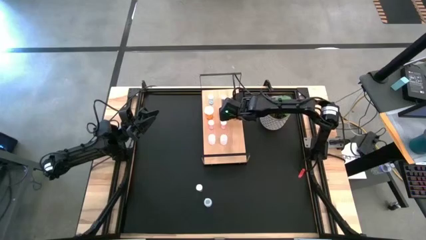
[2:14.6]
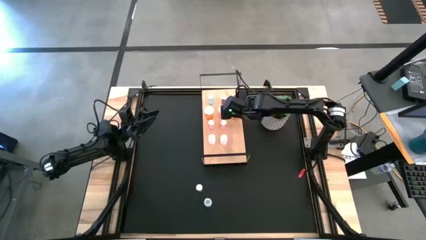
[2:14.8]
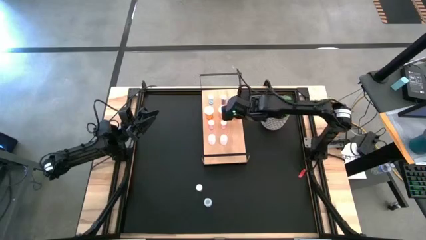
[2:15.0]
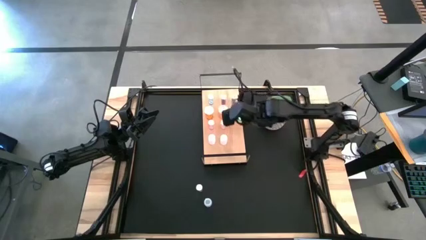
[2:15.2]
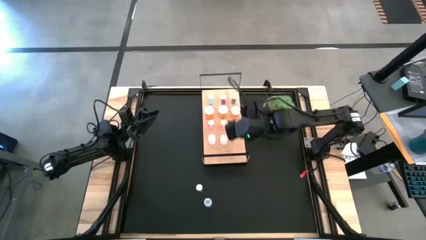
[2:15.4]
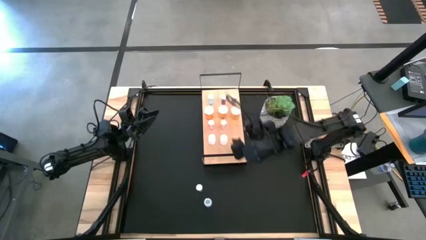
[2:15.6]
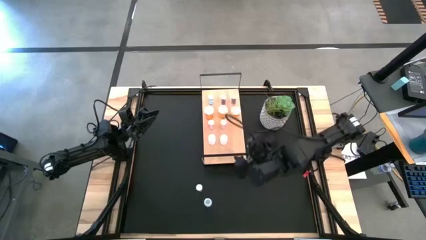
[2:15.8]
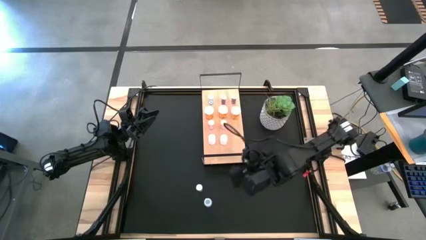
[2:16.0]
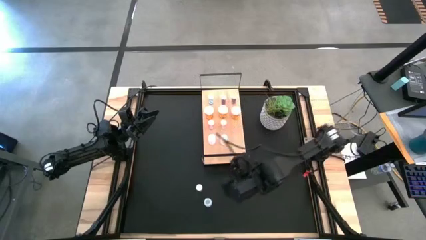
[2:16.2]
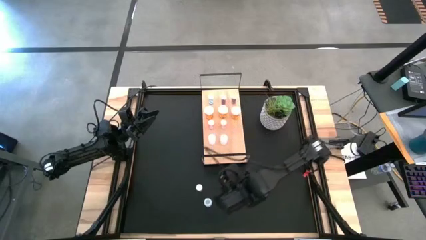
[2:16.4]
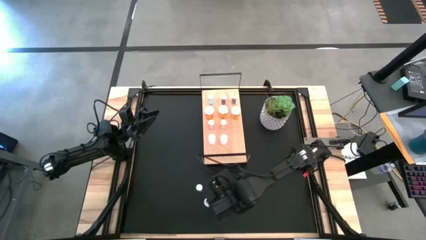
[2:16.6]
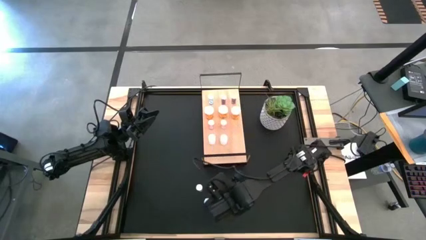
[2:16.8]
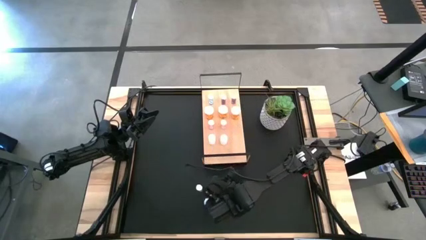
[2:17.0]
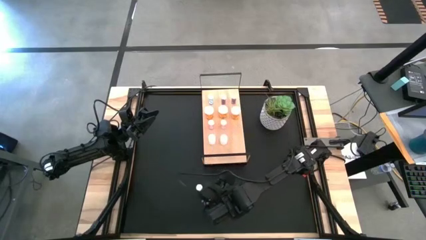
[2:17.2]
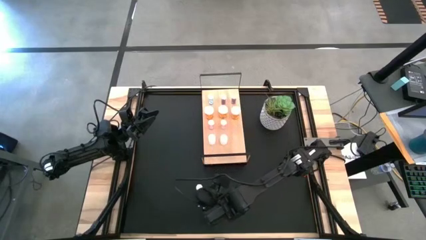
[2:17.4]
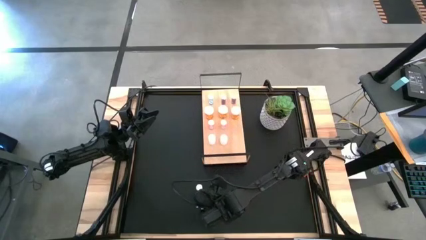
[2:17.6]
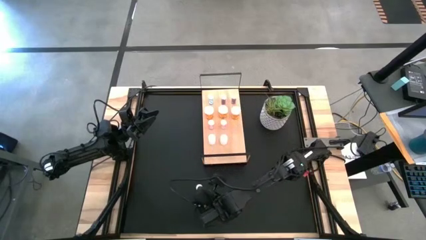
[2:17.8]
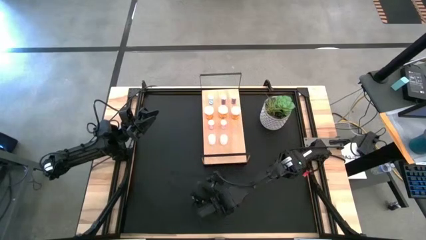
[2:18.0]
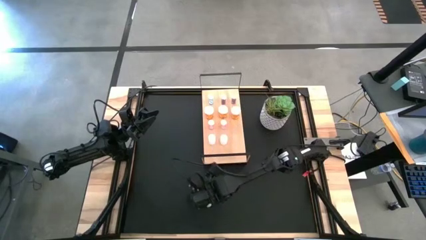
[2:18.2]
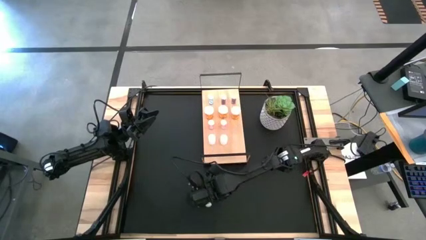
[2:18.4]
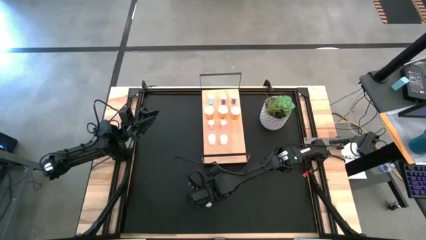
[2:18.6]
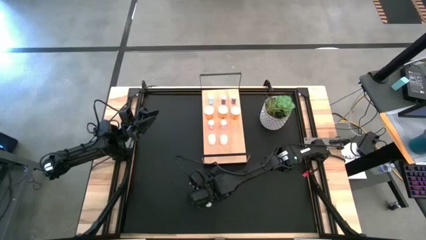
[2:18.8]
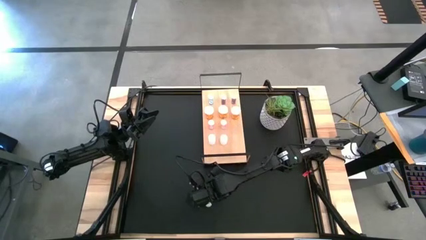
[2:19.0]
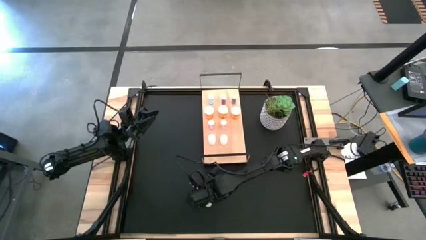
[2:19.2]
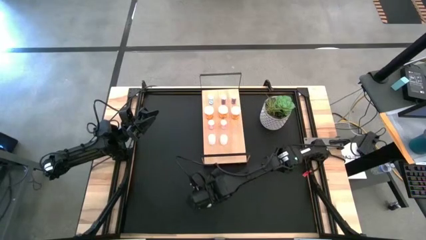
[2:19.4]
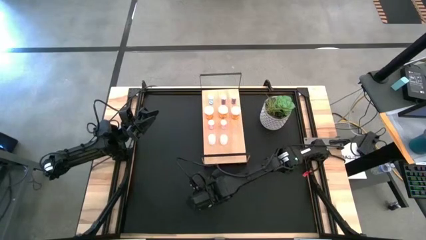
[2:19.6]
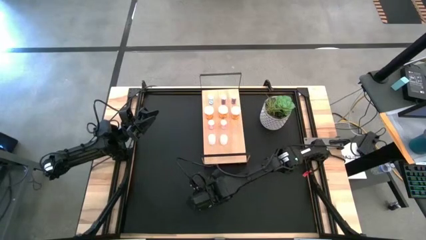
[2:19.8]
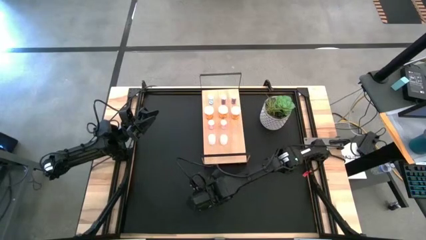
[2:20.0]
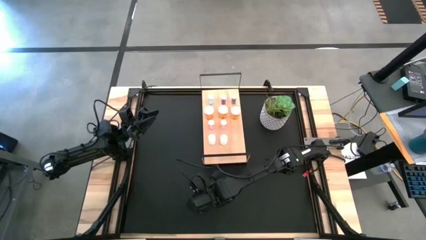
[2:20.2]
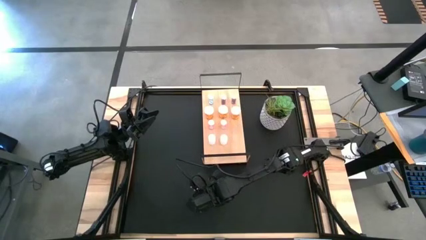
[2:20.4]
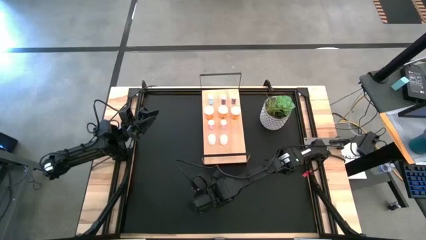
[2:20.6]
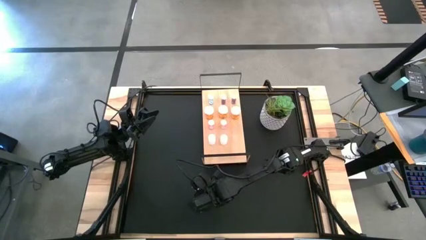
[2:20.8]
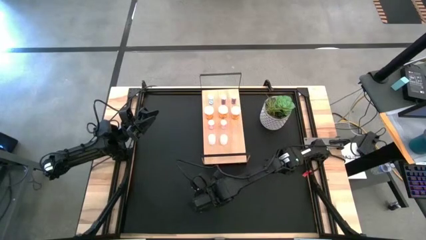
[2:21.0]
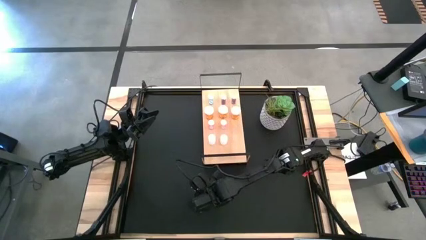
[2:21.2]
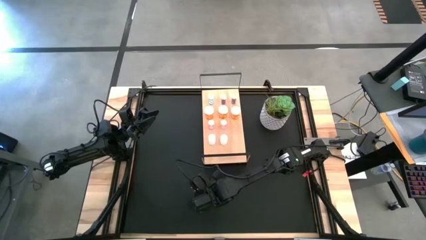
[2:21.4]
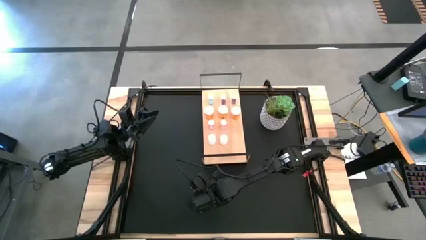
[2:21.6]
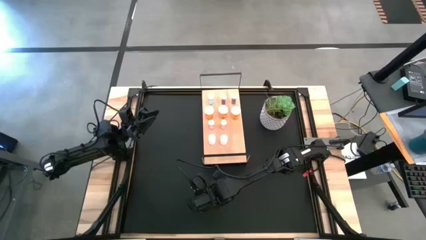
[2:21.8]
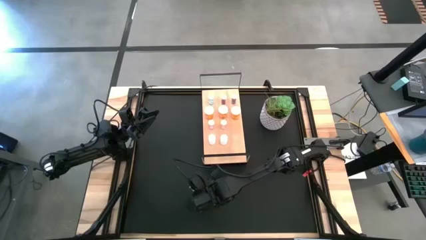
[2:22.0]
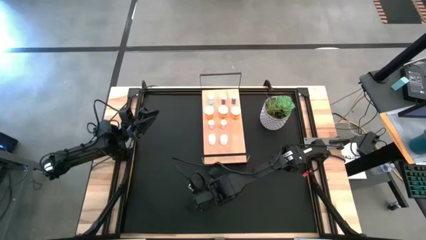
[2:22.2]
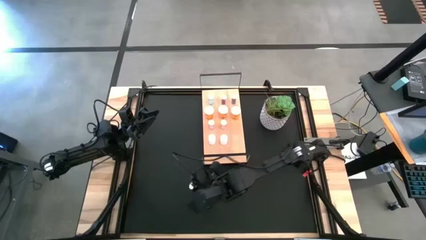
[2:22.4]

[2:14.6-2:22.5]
Task: Pick and place medicine bottles onto shelf by color
Put the pink pill bottle on the shelf aligned with the pink pill bottle

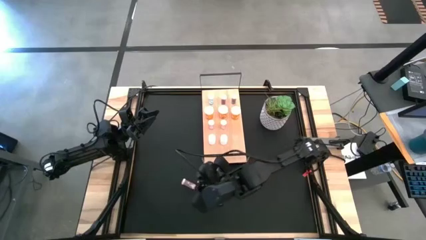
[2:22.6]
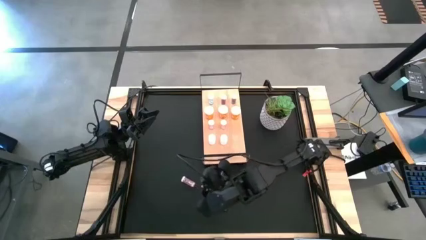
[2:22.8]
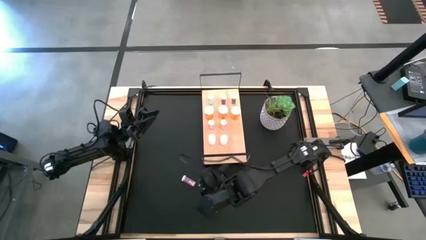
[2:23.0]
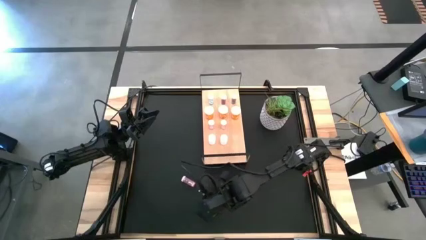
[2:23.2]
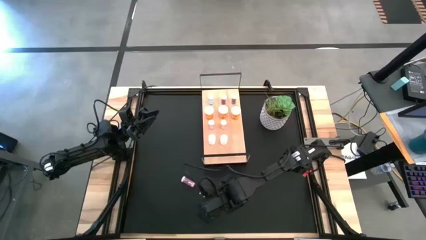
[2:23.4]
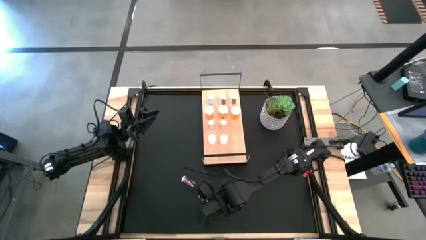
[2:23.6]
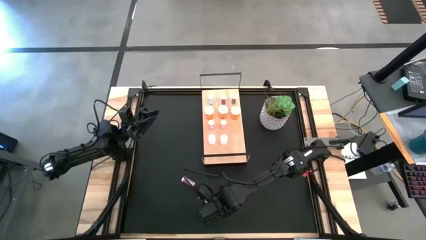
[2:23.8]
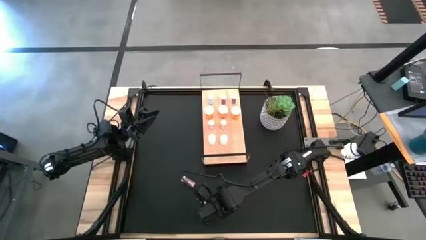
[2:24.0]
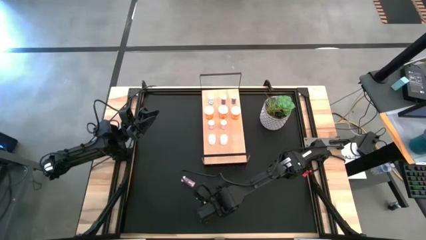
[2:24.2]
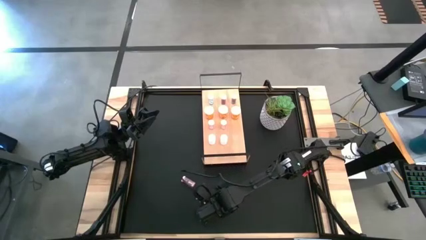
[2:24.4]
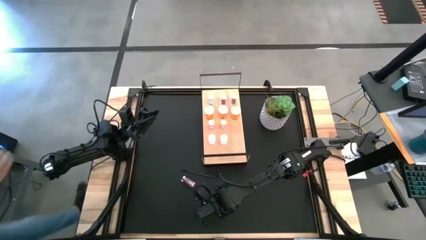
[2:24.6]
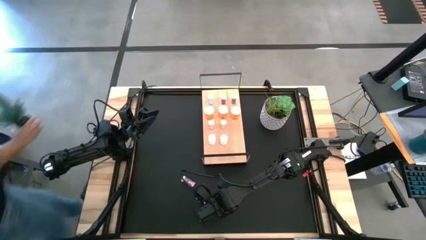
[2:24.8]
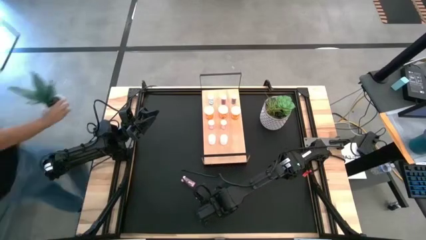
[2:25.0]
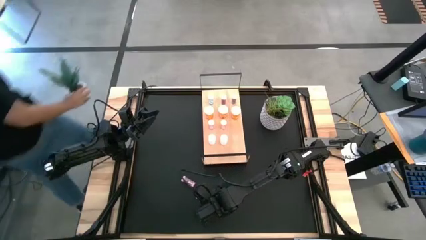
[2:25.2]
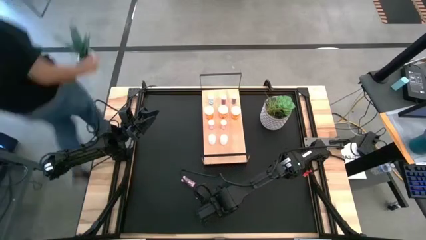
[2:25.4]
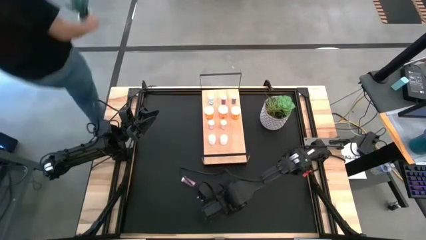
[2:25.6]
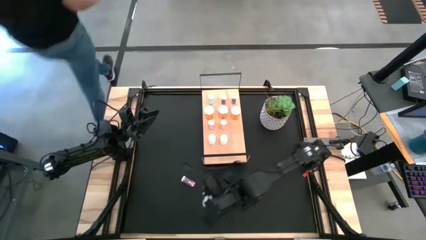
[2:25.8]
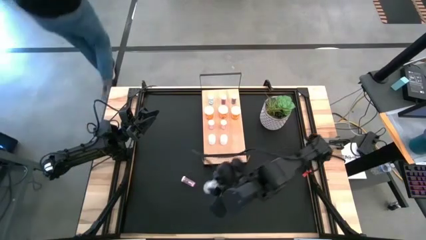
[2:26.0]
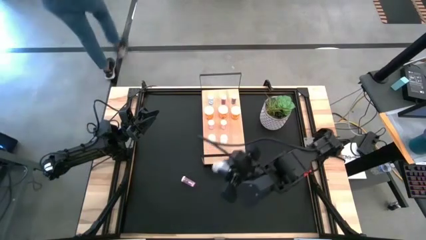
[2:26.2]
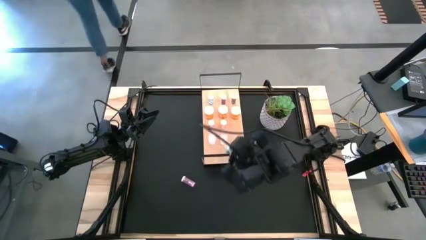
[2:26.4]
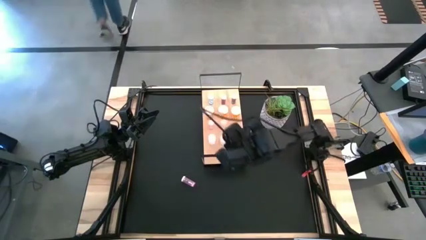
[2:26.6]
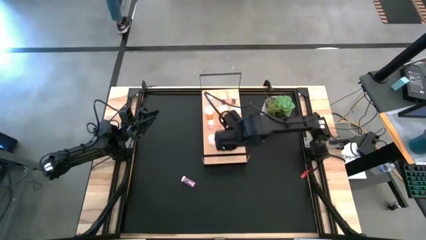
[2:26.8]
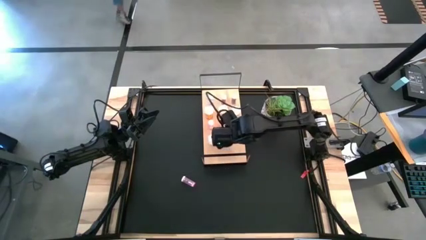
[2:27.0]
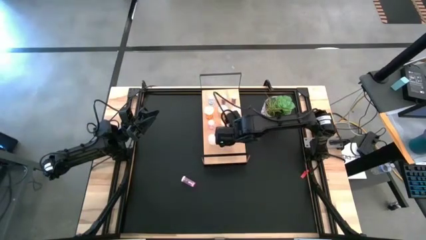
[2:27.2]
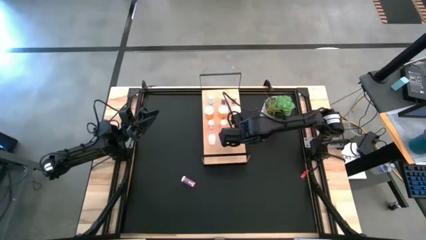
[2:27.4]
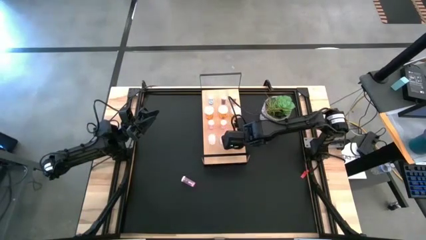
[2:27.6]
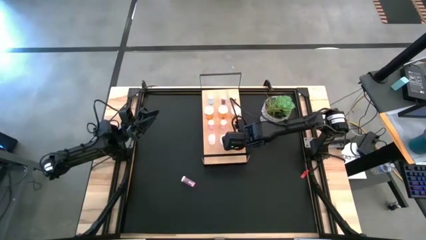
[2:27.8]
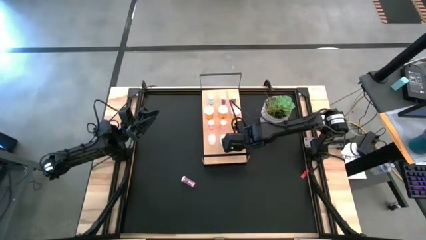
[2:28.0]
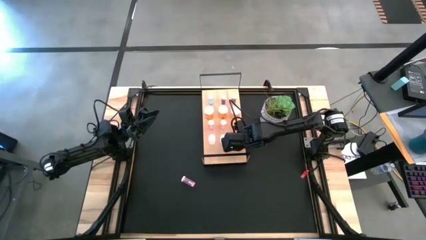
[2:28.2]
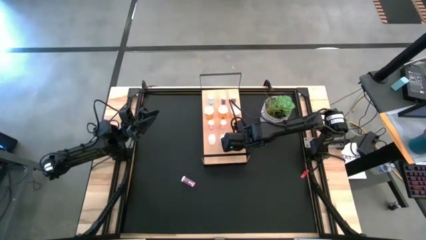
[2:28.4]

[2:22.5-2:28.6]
Put the white pill bottle on the shelf aligned with the white pill bottle

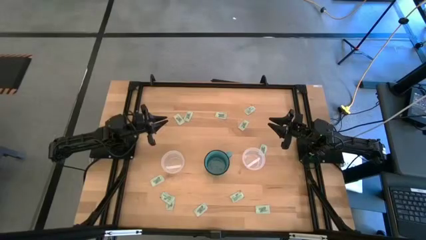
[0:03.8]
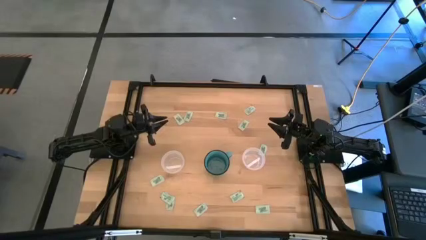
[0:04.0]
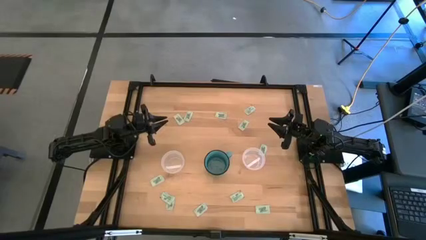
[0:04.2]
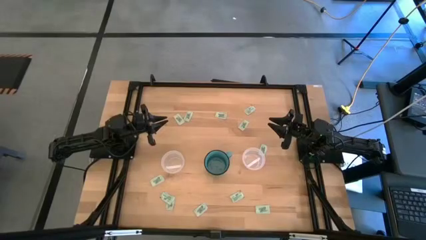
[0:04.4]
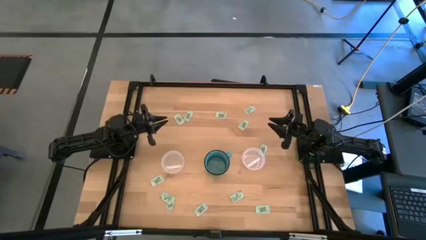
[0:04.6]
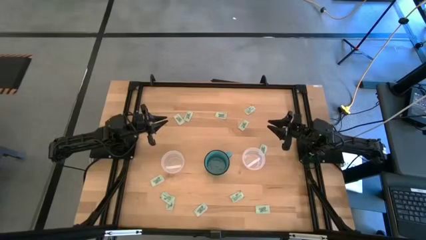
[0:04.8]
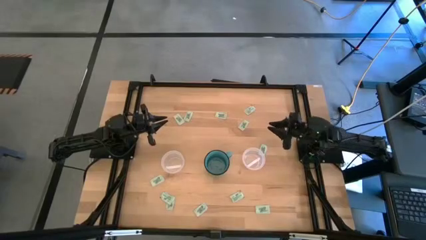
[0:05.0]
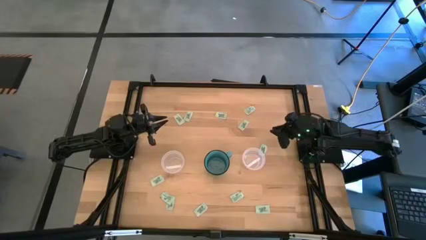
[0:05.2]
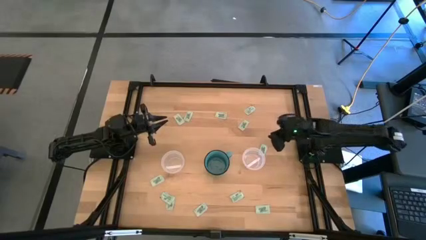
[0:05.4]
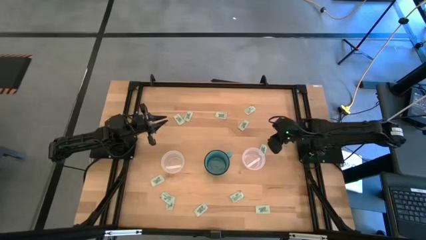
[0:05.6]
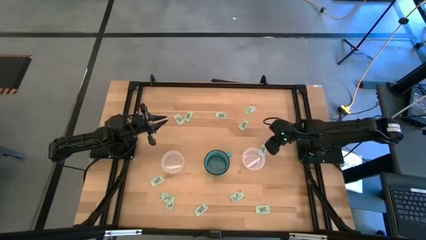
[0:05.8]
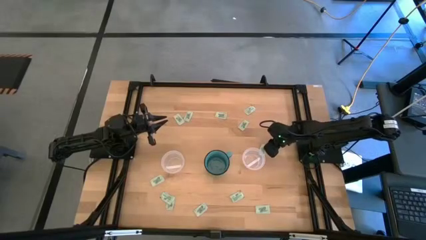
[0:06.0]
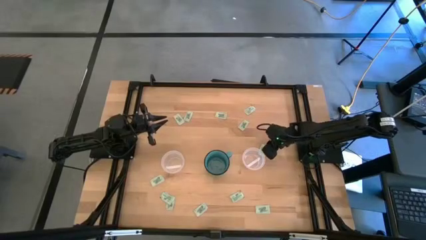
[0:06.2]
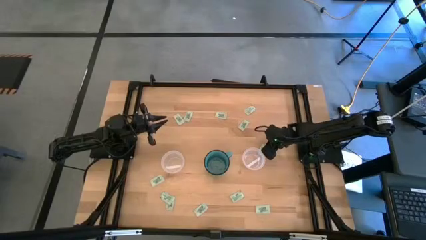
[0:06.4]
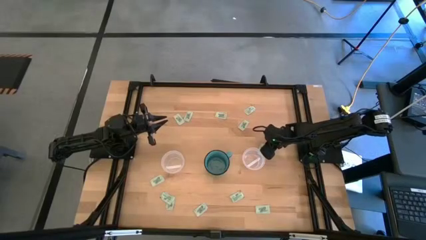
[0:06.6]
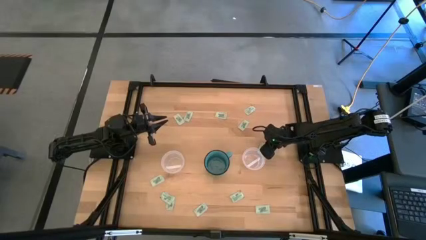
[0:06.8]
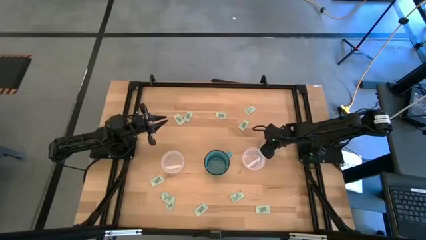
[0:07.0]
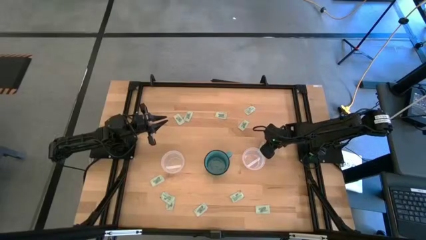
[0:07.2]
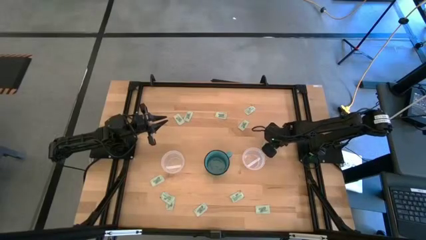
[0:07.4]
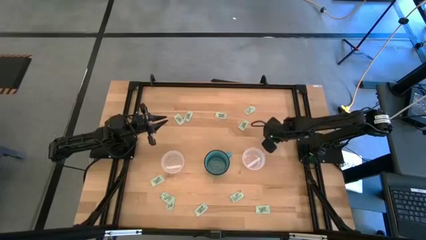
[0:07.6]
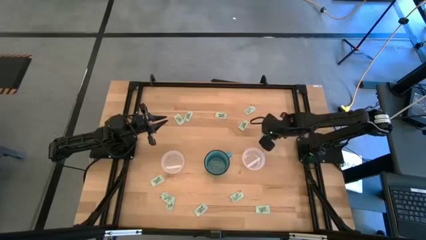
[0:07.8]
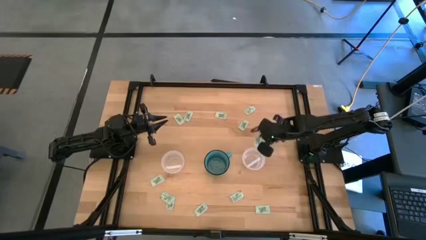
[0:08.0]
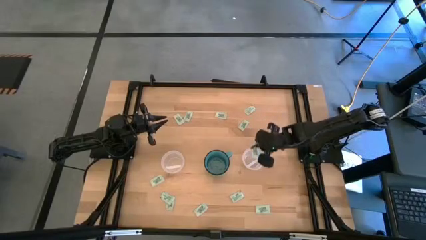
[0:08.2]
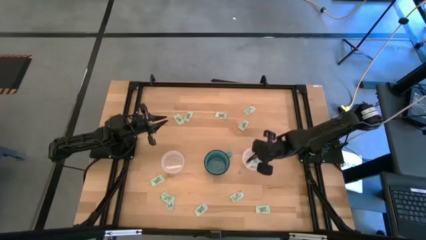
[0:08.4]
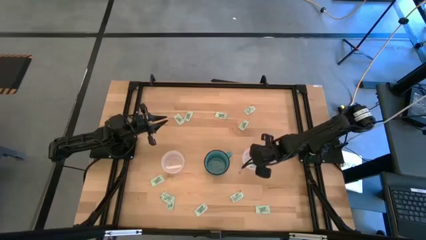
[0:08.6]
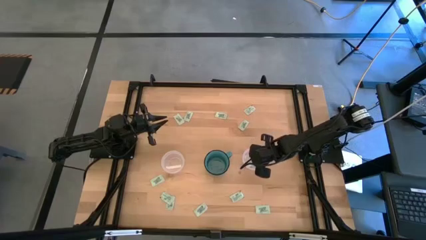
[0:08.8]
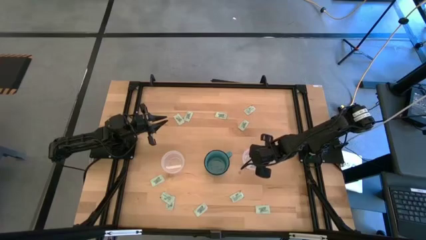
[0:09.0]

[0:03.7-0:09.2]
Task: Pick and place Stevia / Truvia into bins
Put the green stevia packet into the right transparent container
